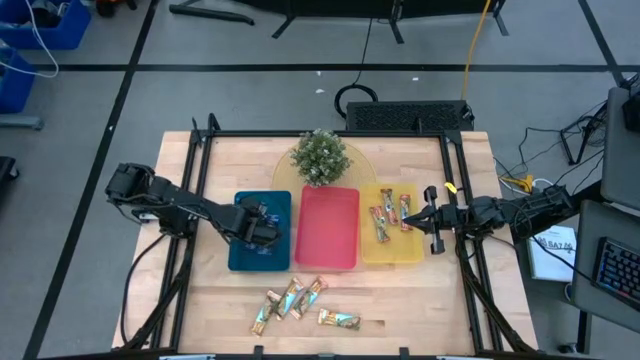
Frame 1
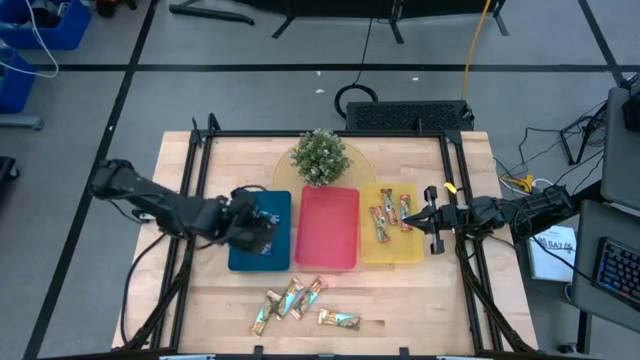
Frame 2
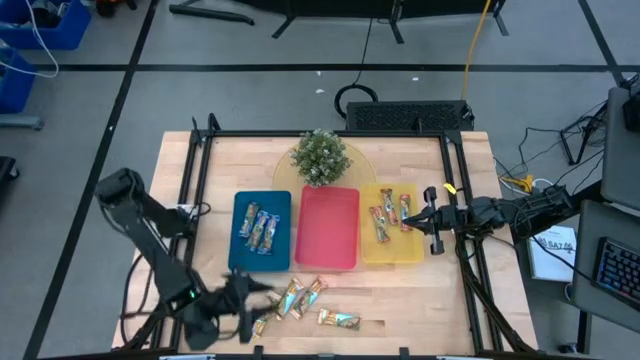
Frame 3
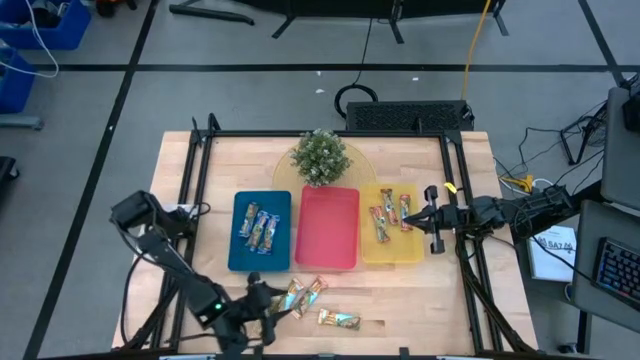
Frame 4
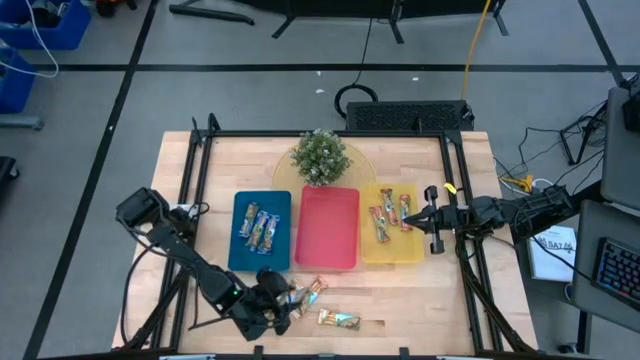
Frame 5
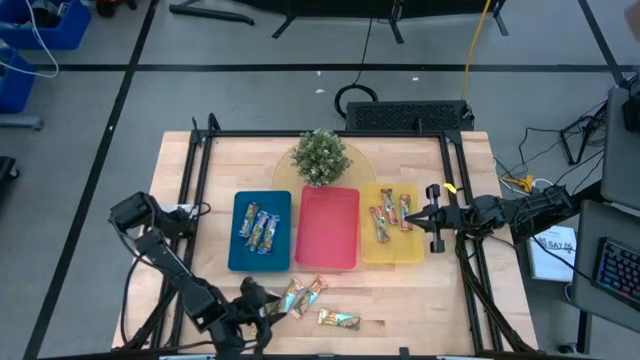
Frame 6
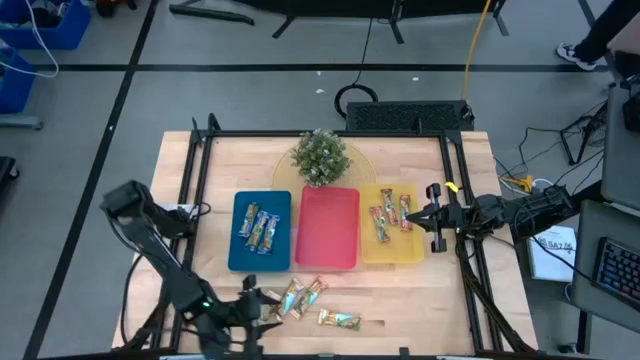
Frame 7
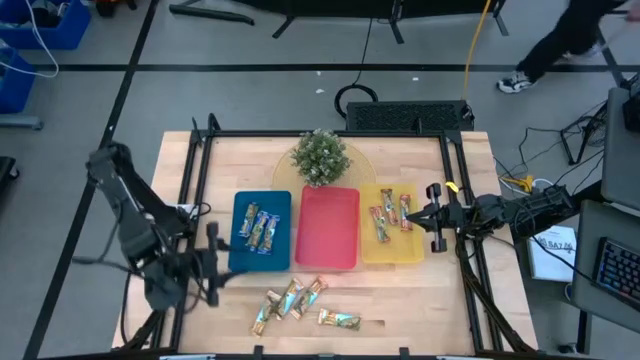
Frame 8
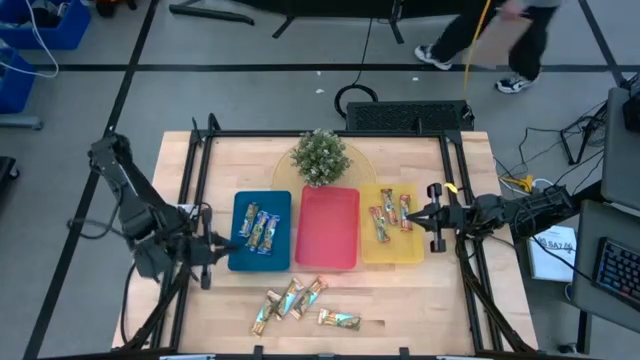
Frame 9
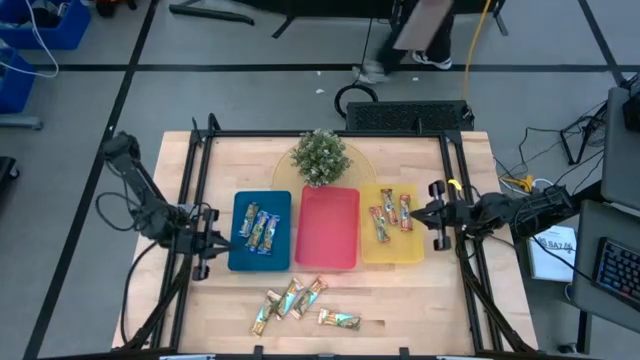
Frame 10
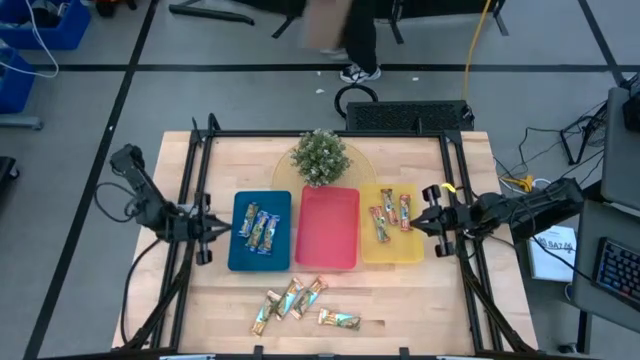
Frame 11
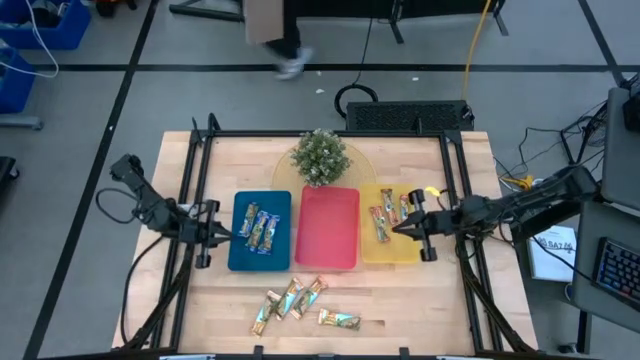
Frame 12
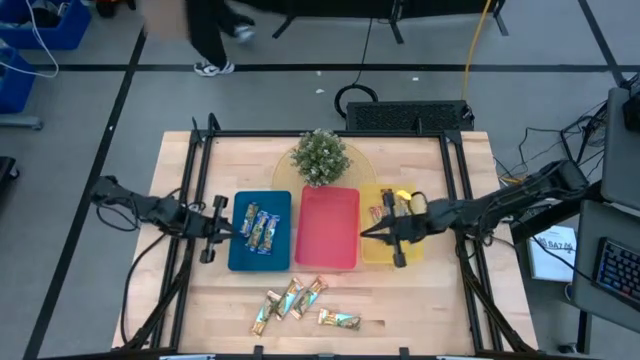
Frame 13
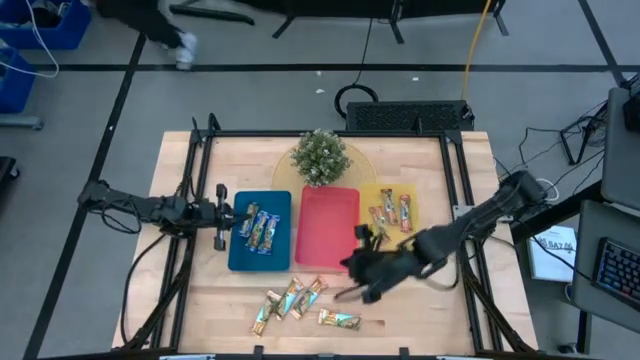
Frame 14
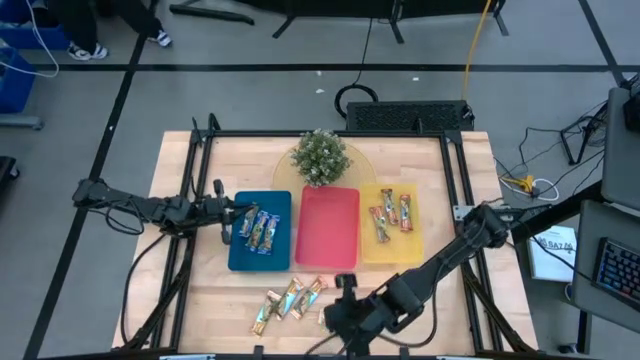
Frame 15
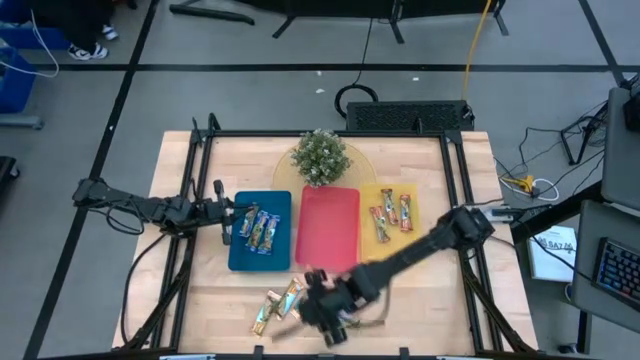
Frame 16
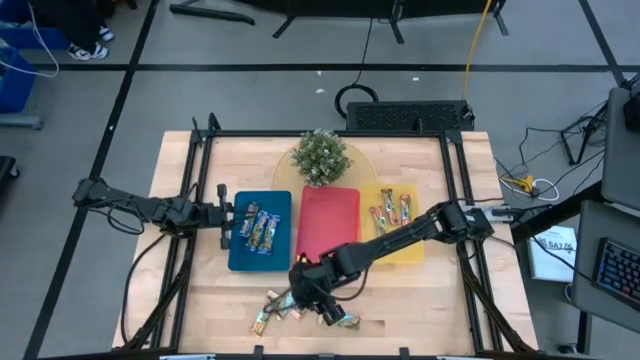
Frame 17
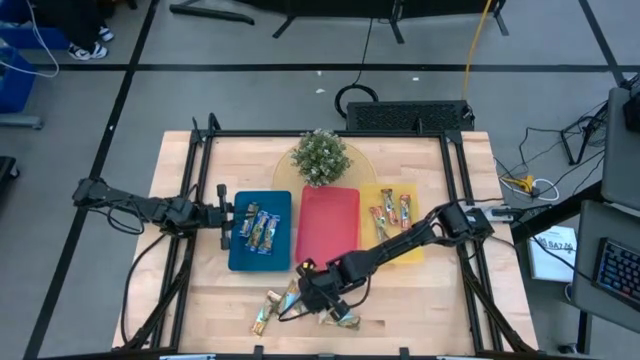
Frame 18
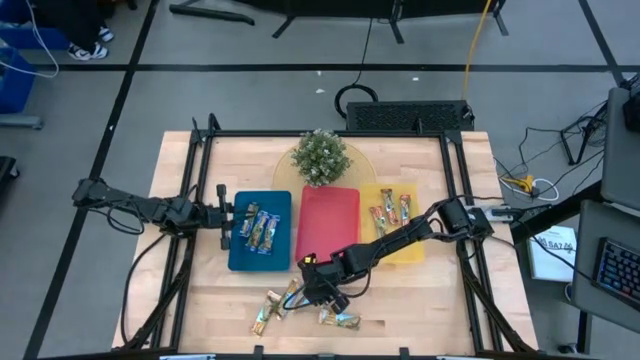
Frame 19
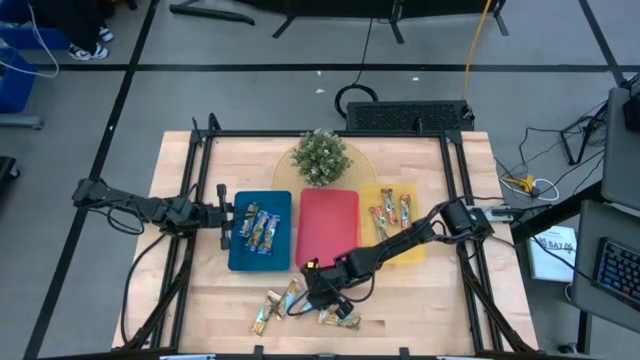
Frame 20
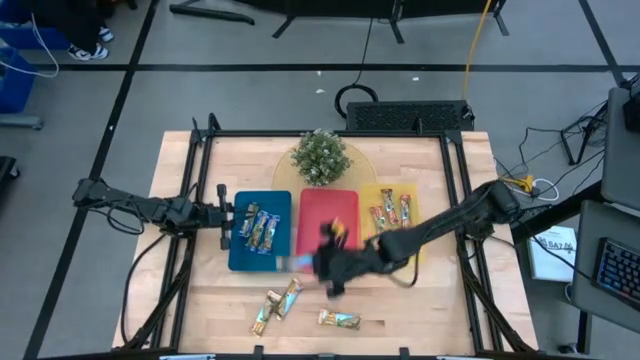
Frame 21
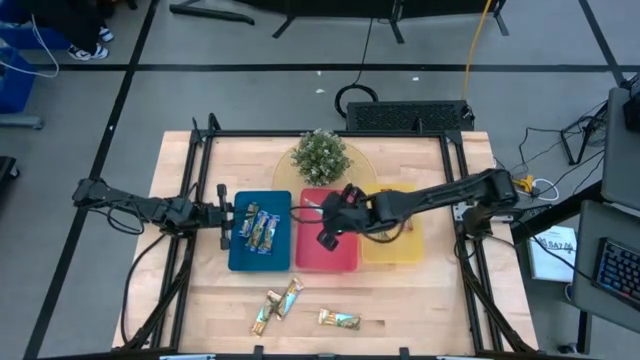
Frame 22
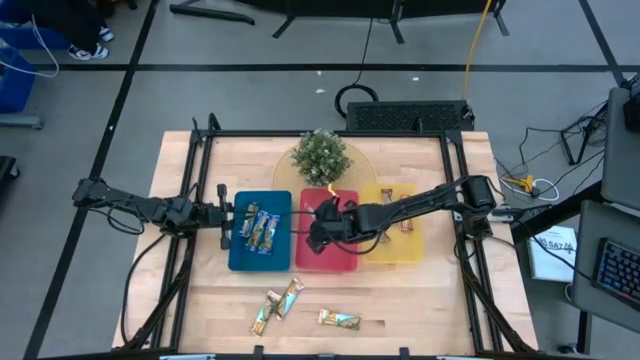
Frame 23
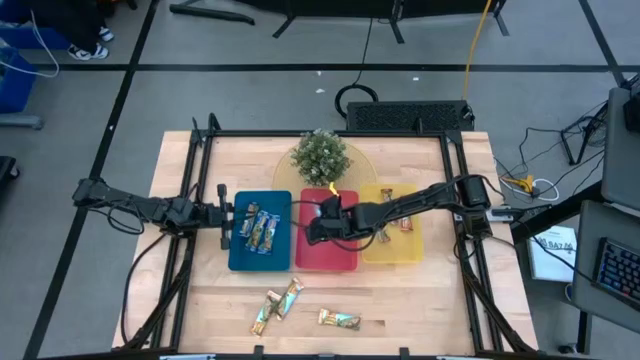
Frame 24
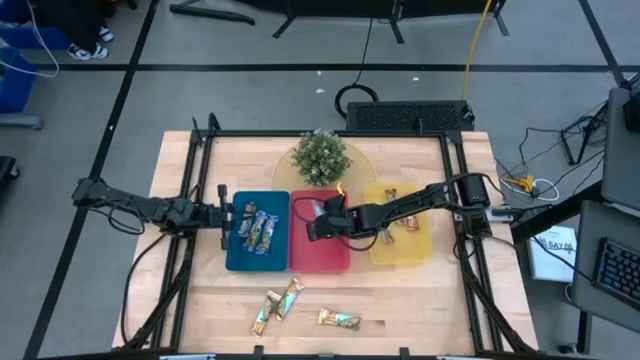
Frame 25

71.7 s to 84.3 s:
Task: Pick and place Granola Bars by type
Put the yellow granola bar into the red bin

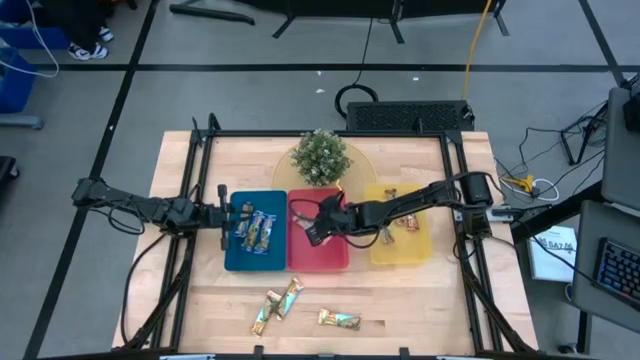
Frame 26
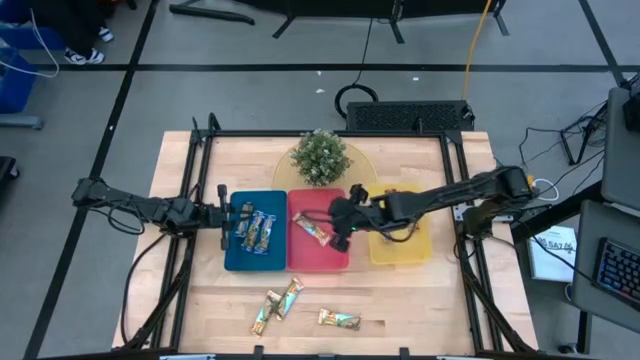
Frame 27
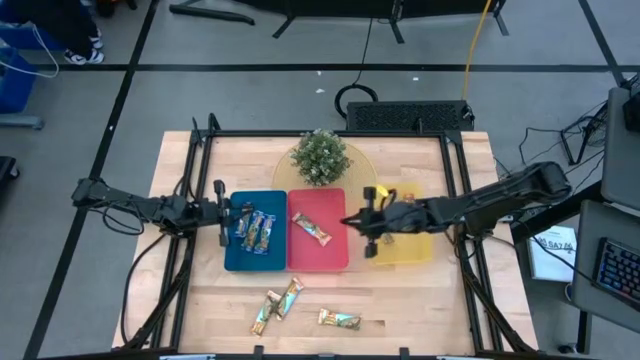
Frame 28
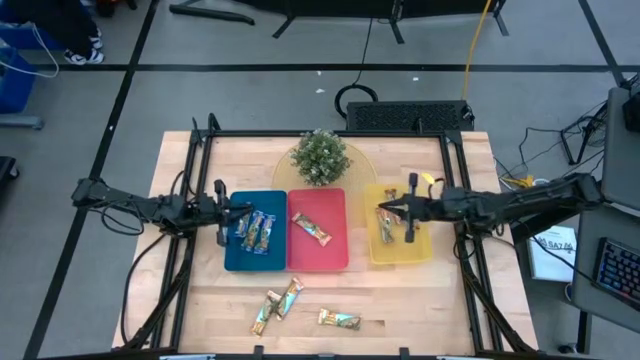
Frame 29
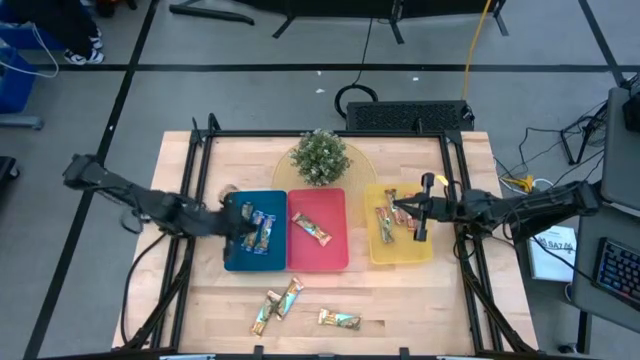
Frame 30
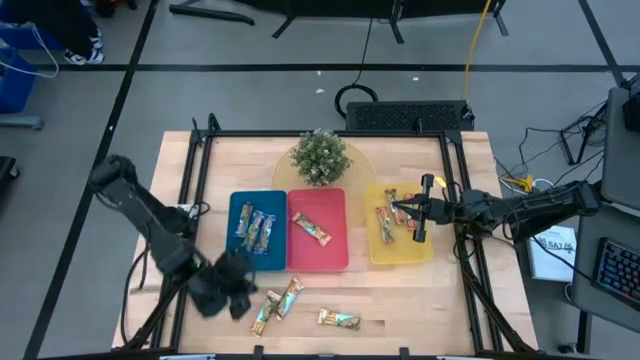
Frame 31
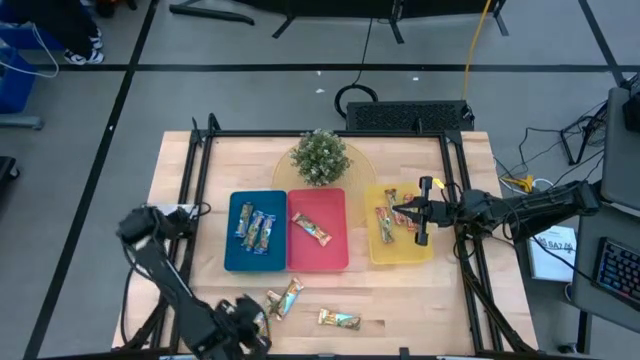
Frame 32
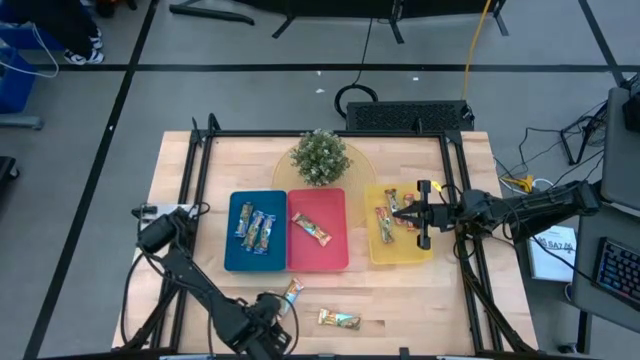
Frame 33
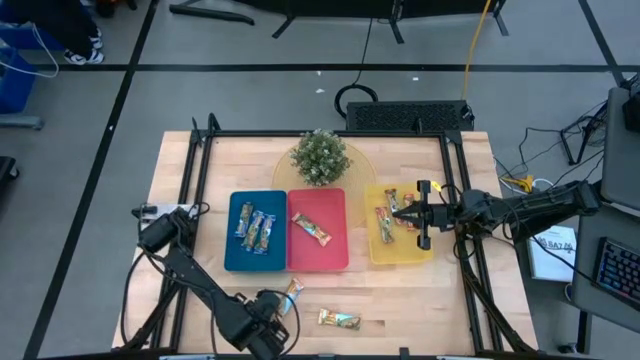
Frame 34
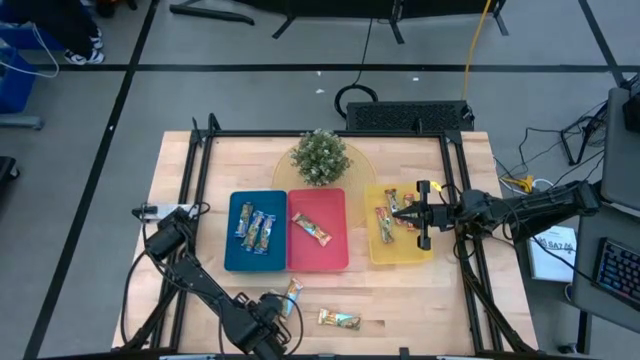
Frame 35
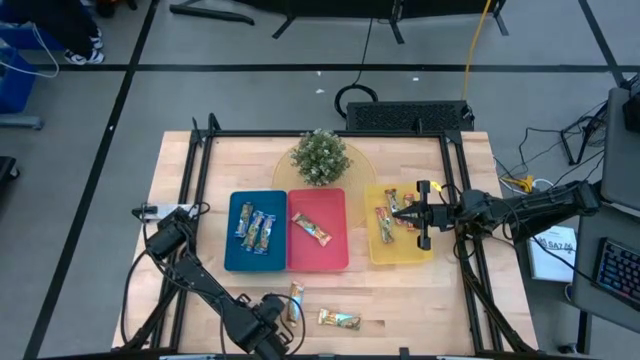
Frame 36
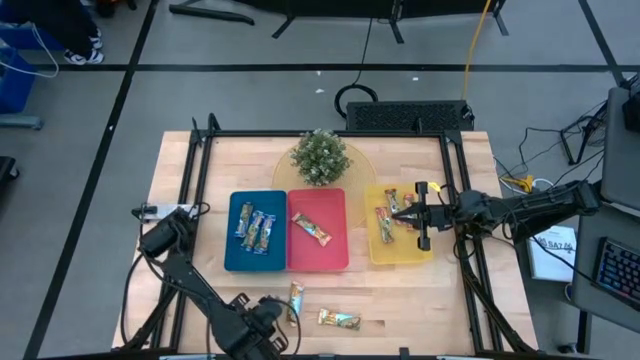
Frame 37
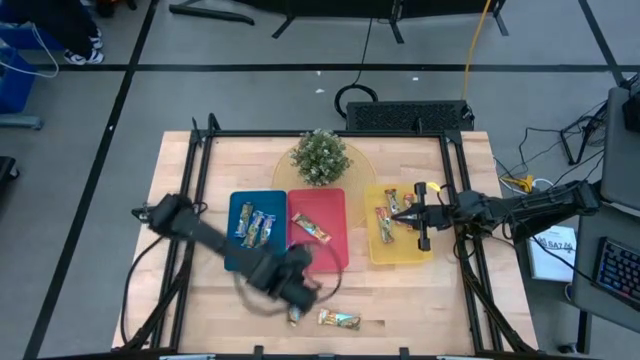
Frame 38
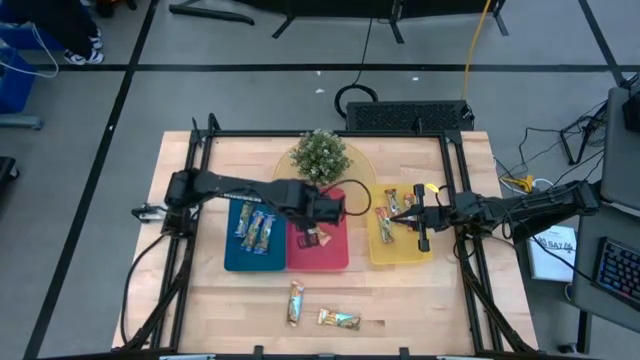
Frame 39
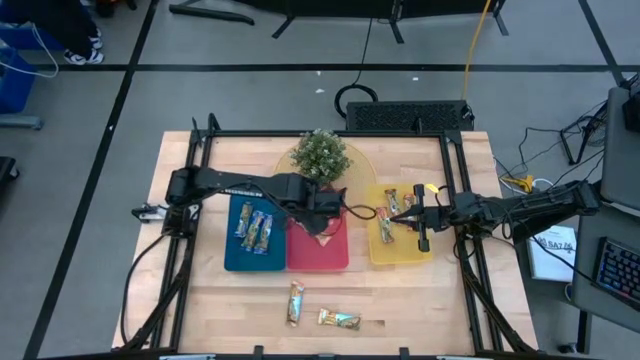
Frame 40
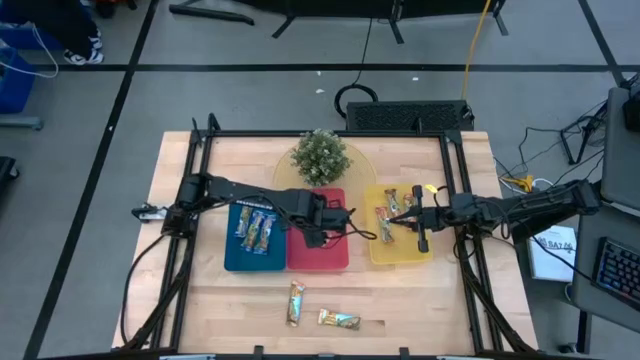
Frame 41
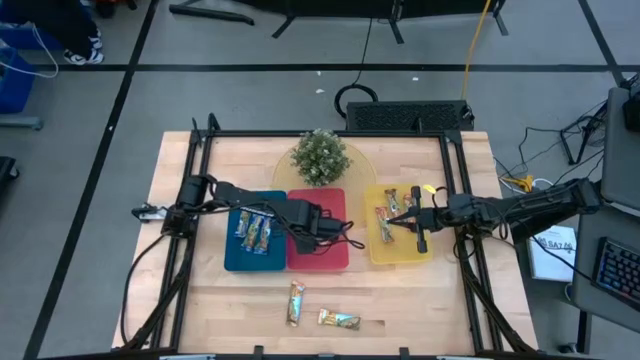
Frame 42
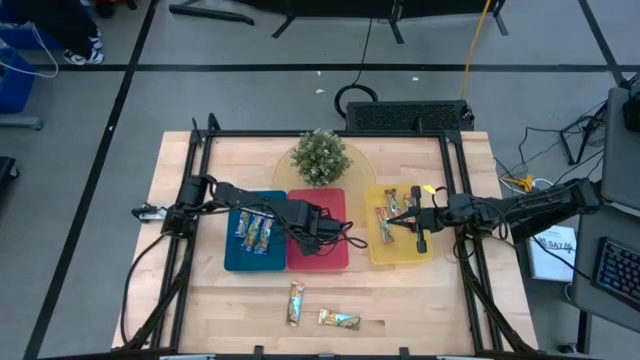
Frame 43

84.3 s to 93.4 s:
Put the left yellow granola bar into the red bin
